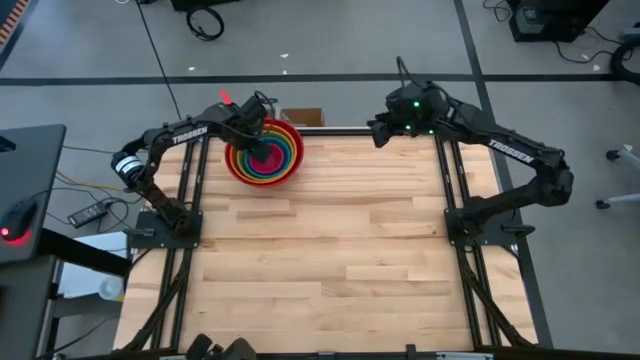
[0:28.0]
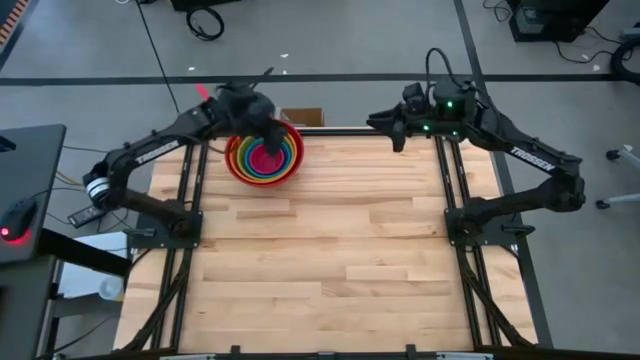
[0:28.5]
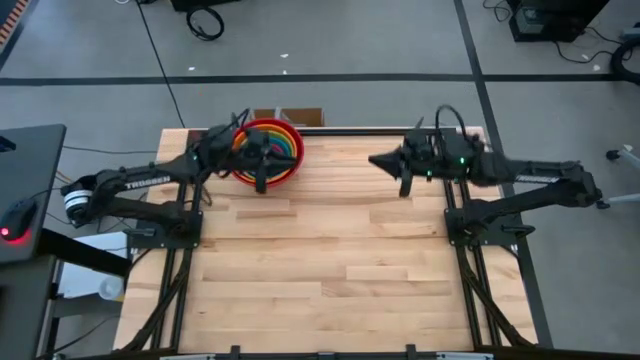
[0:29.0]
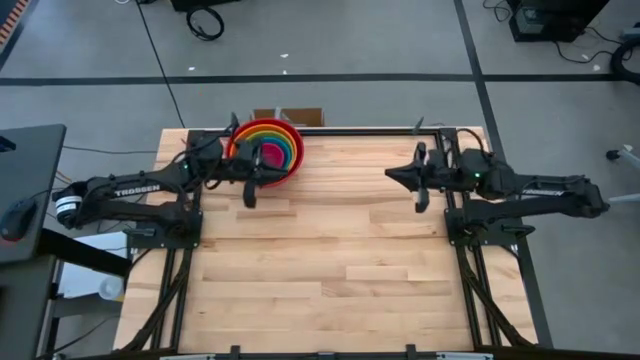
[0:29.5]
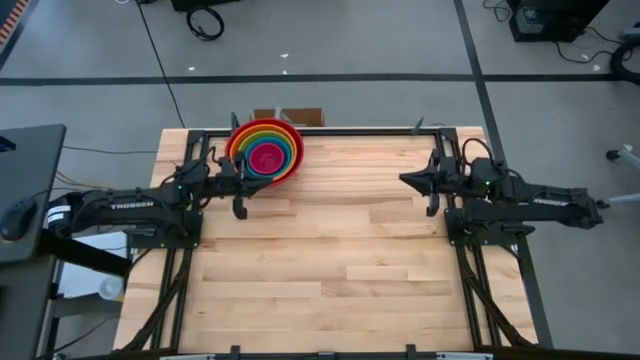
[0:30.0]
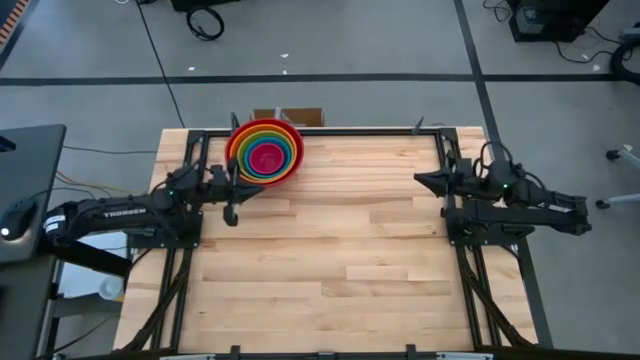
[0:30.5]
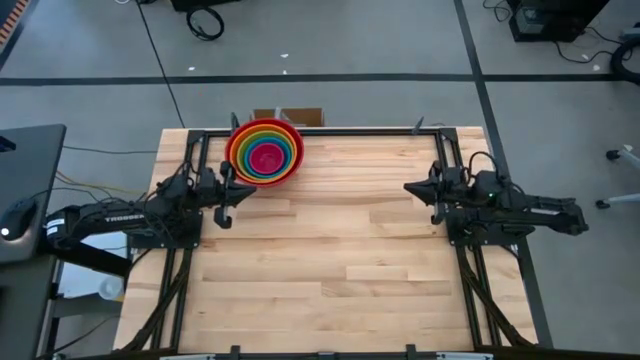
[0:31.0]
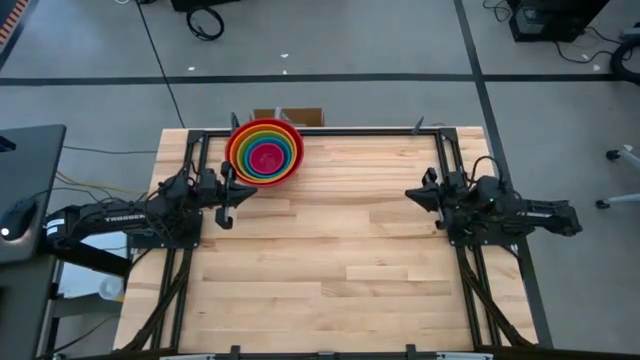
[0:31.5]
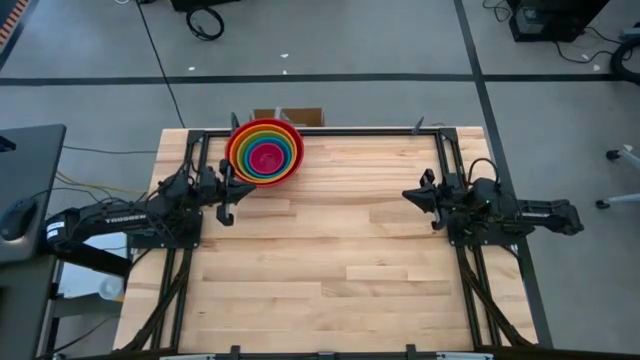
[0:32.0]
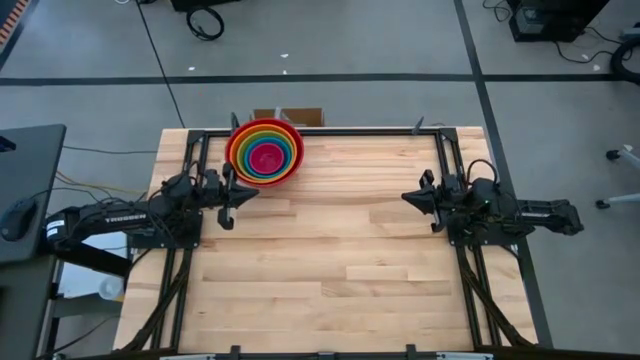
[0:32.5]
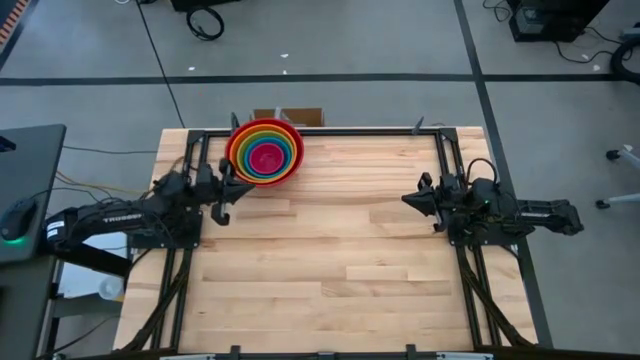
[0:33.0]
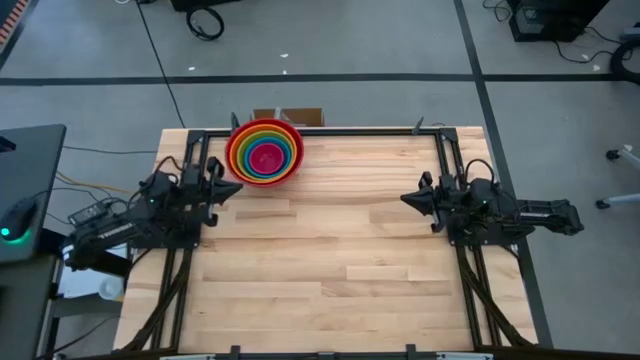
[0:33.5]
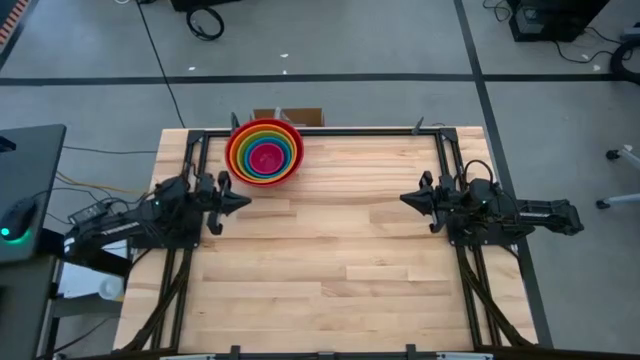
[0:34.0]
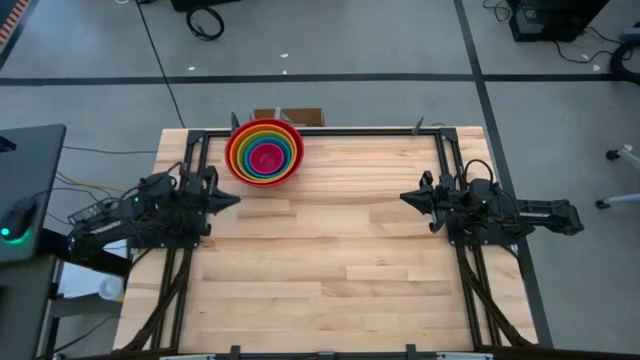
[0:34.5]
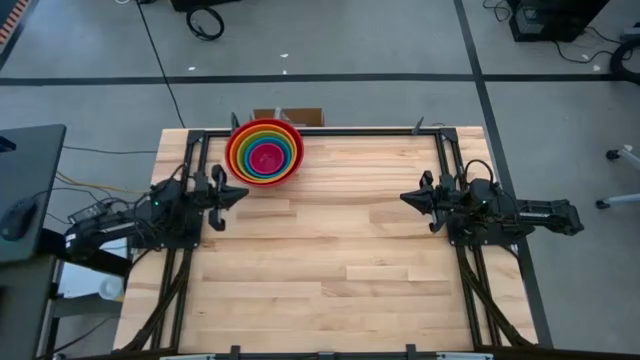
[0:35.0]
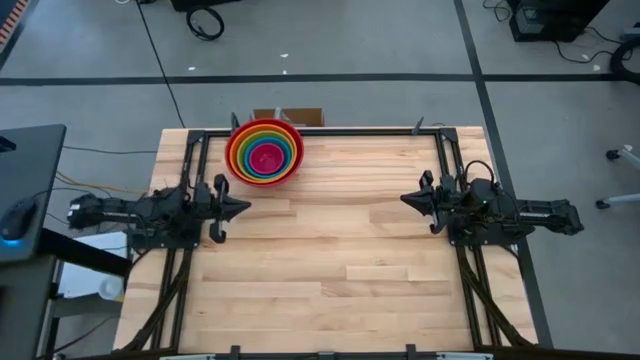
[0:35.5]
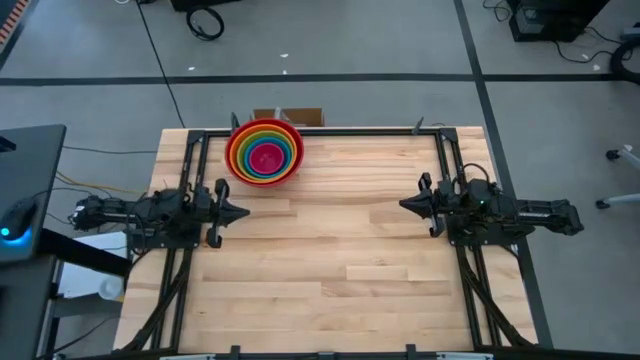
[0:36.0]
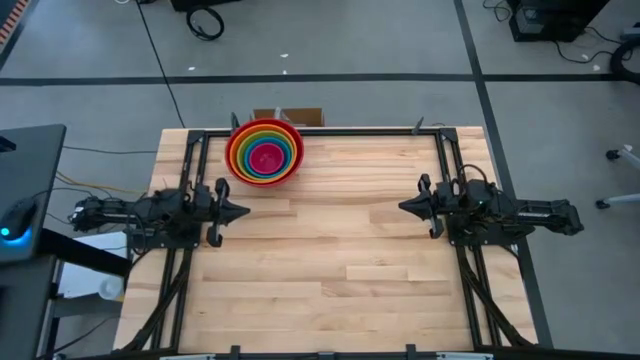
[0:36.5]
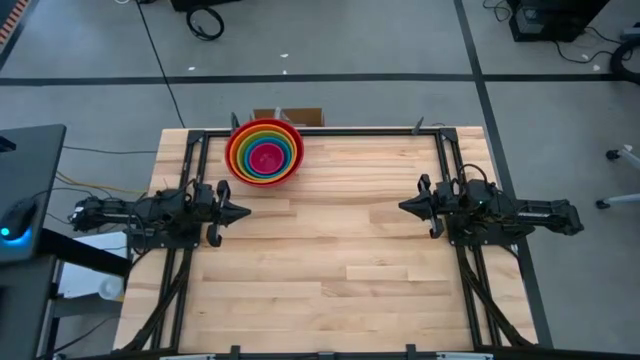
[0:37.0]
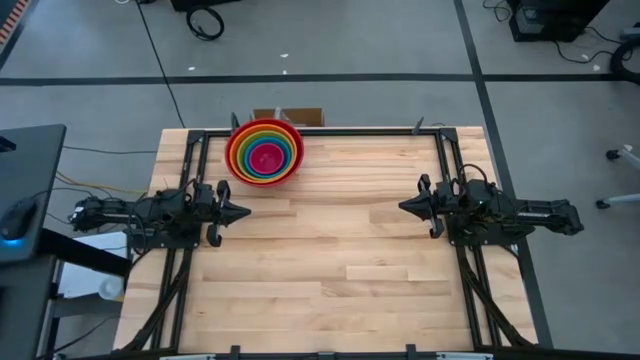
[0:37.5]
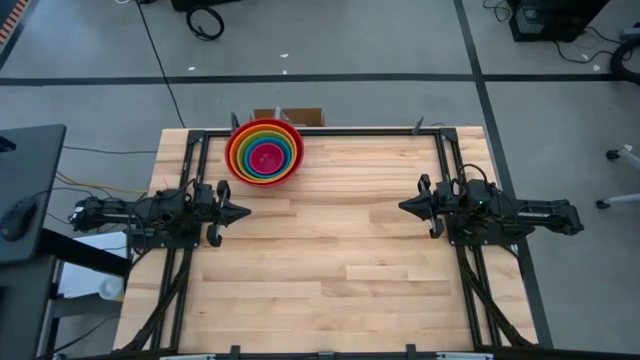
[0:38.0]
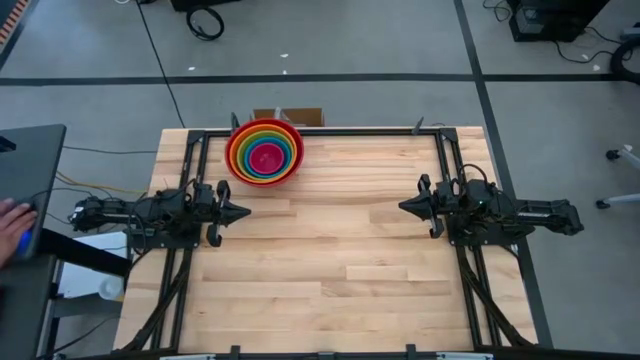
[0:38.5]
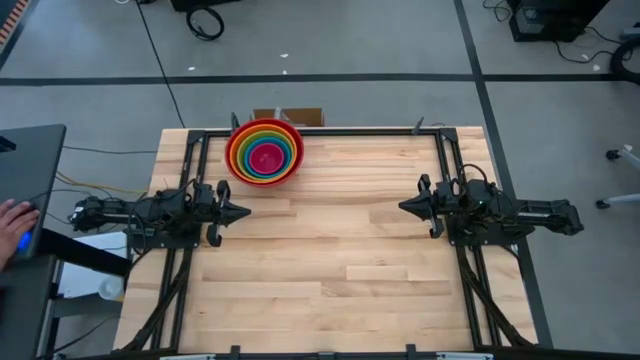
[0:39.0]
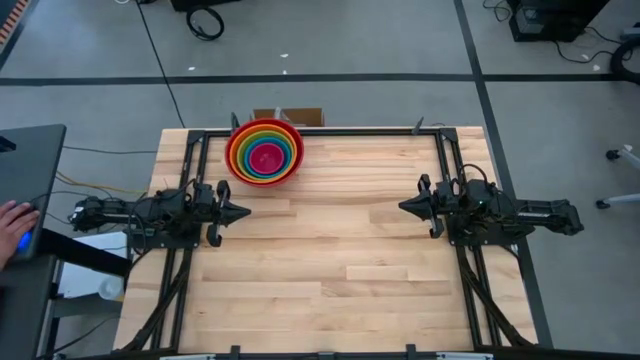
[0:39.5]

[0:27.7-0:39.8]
Return to Home Position
